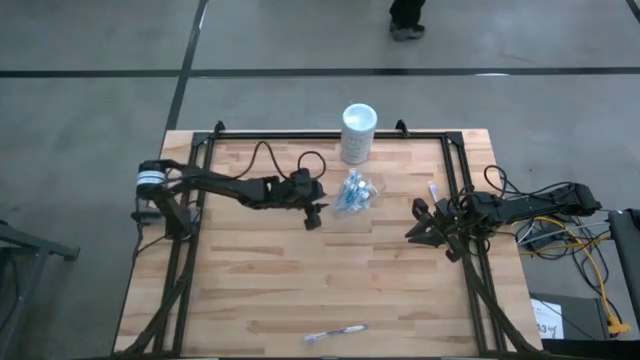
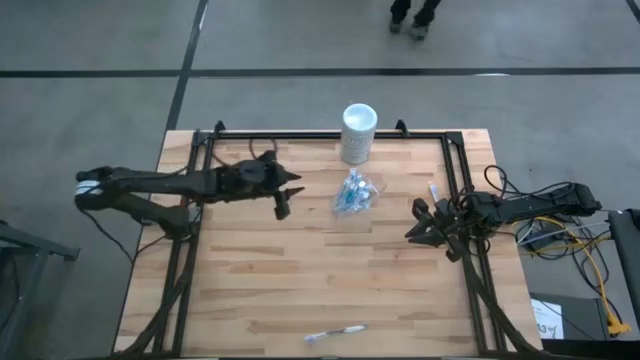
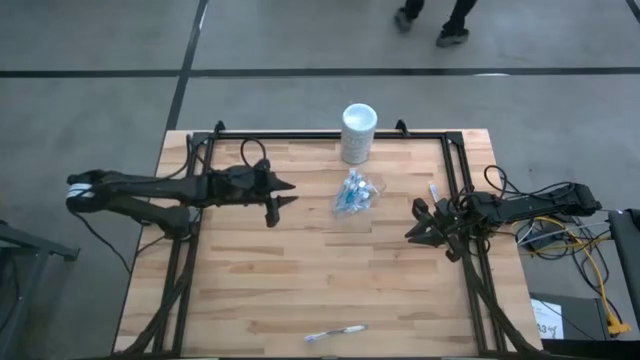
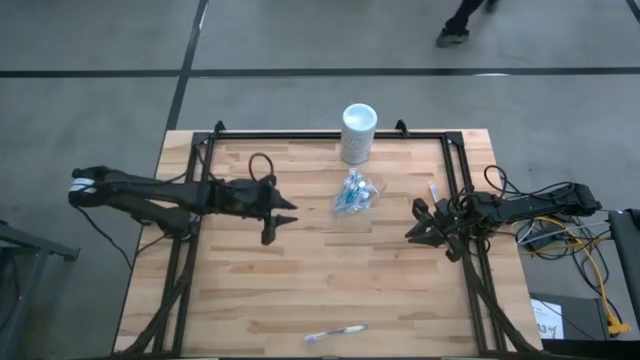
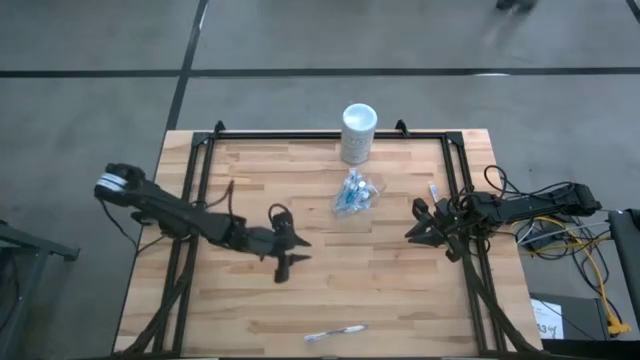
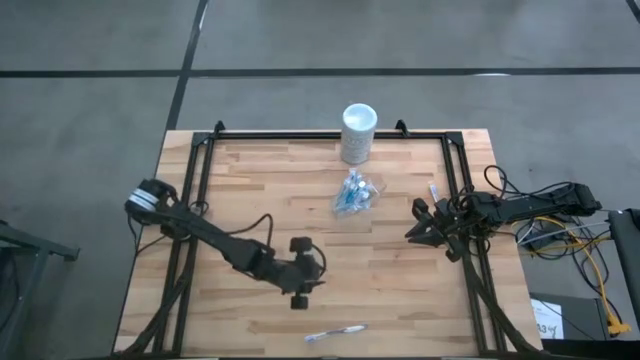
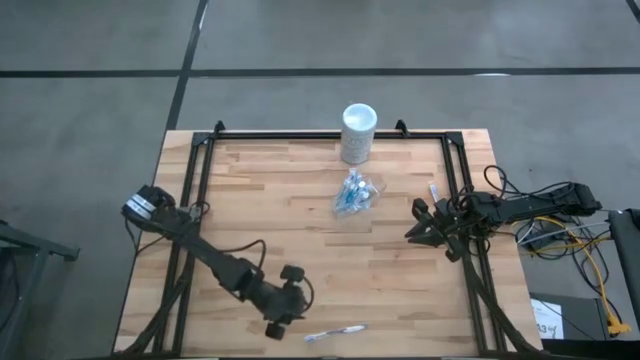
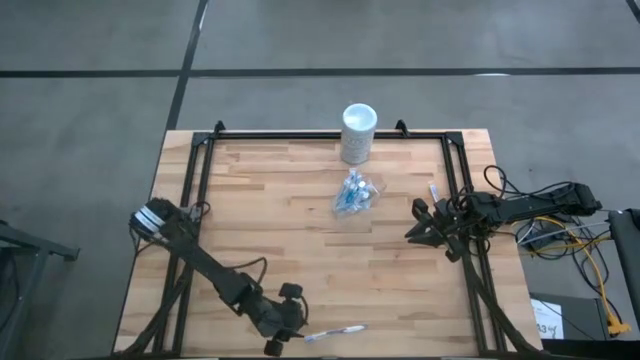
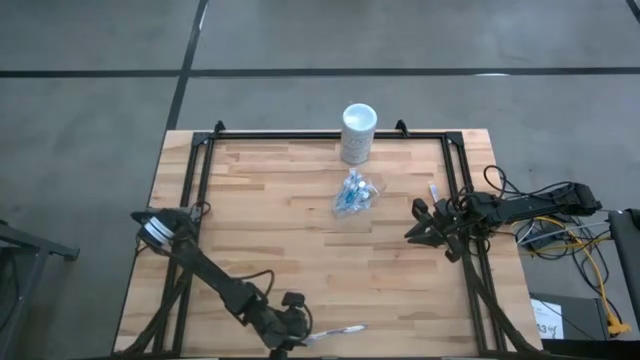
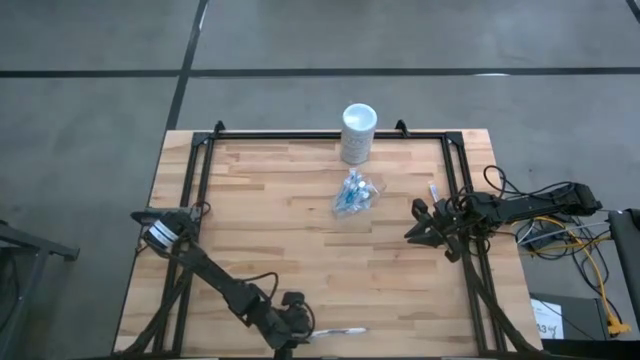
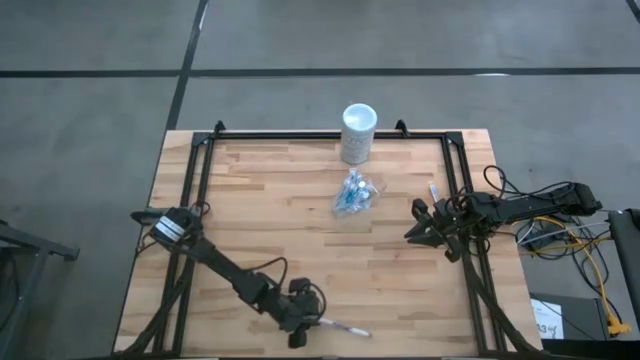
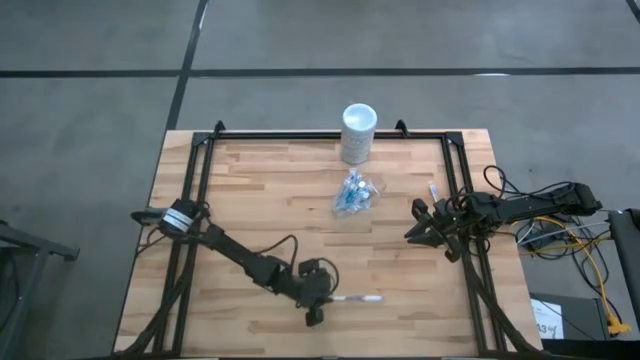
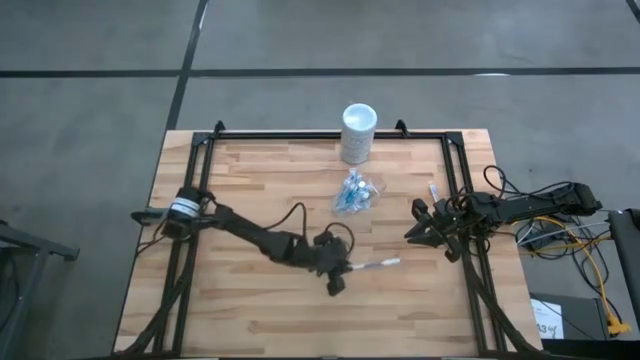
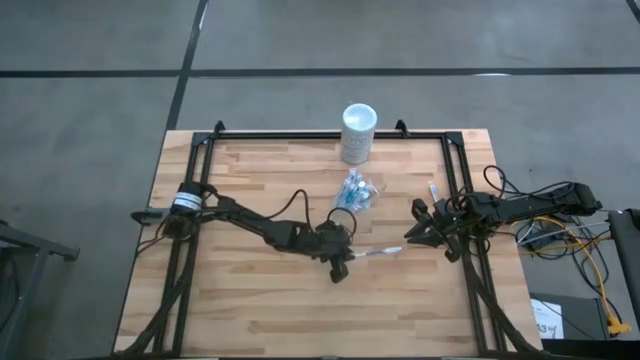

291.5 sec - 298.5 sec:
Task: Pick & Place toothbrushing station
Move the purple toothbrush to the center of the table

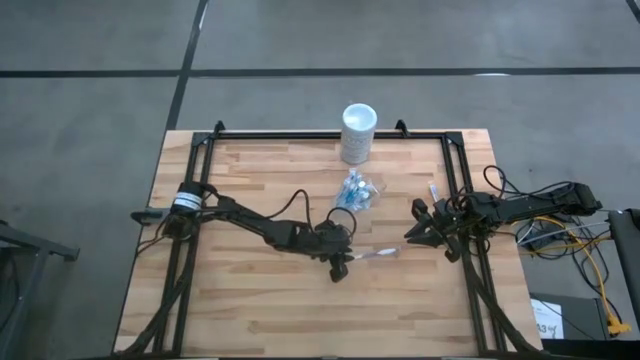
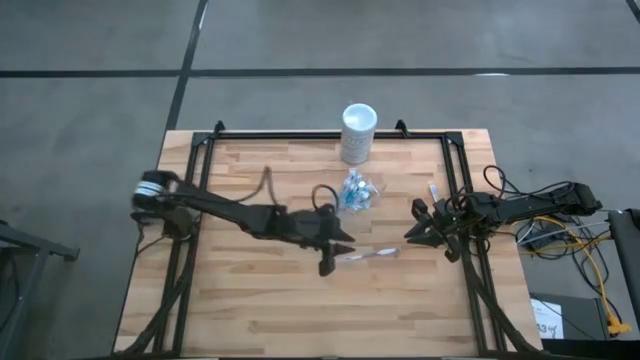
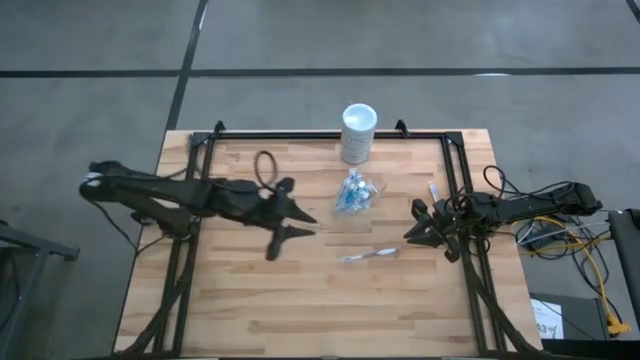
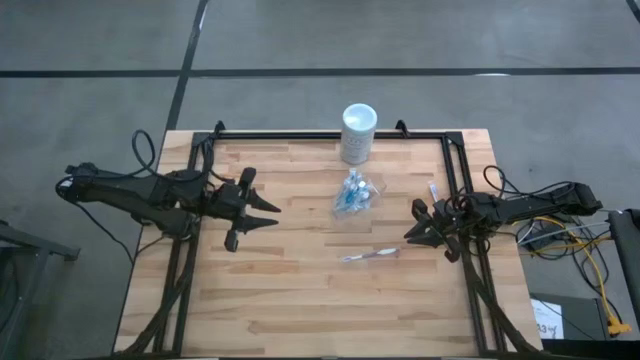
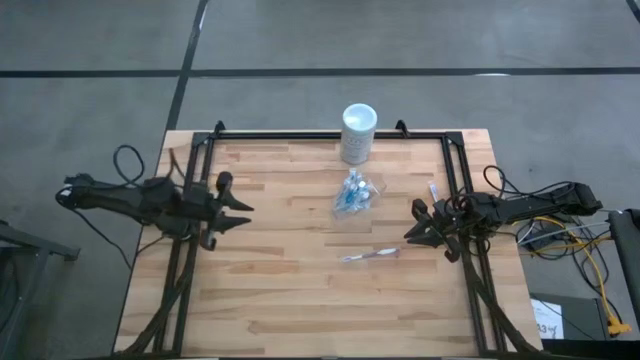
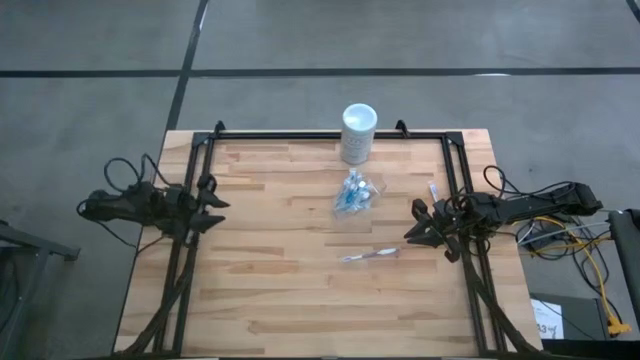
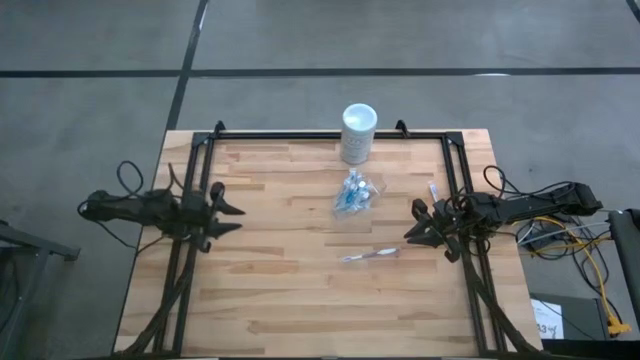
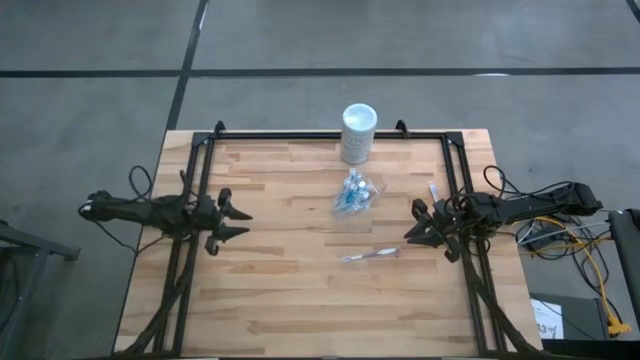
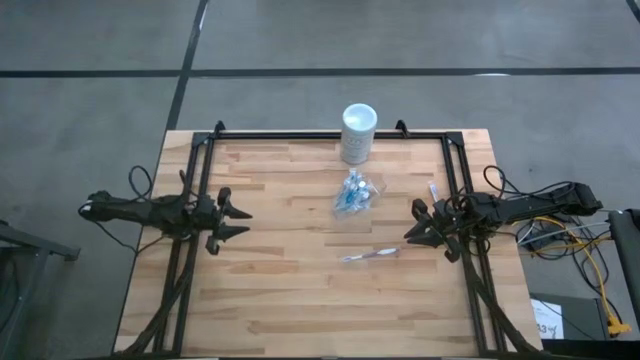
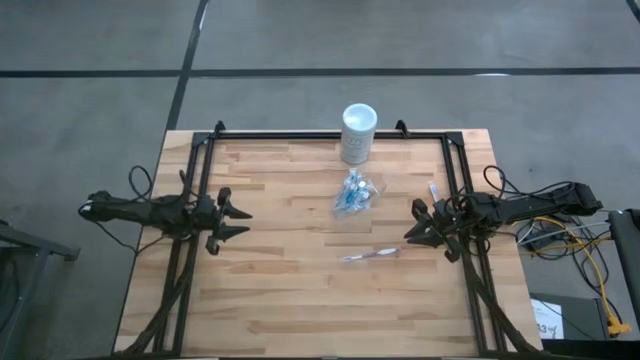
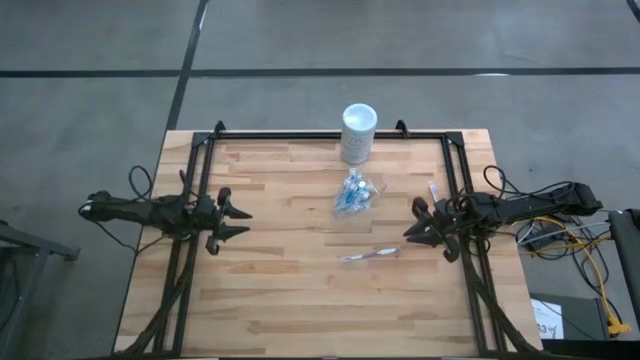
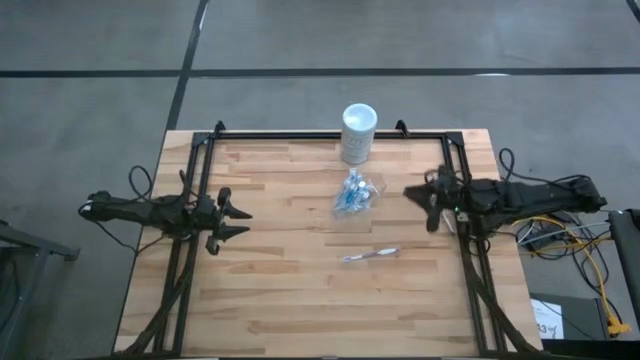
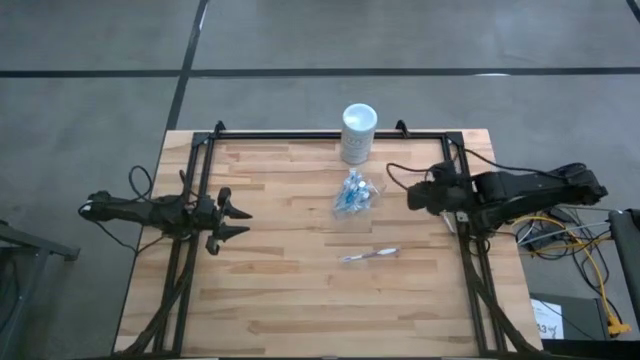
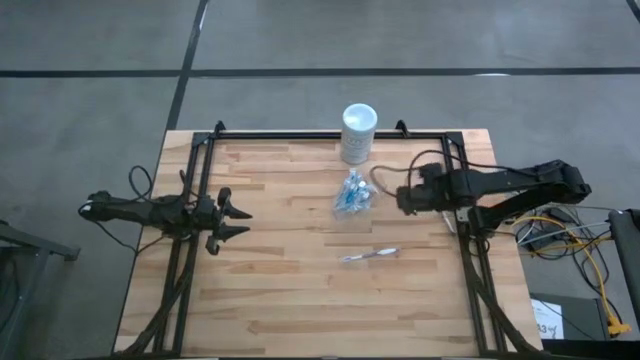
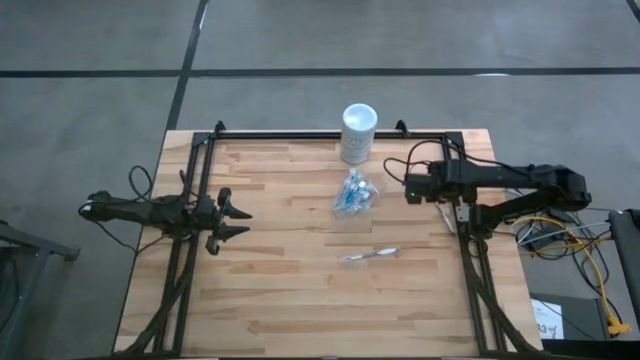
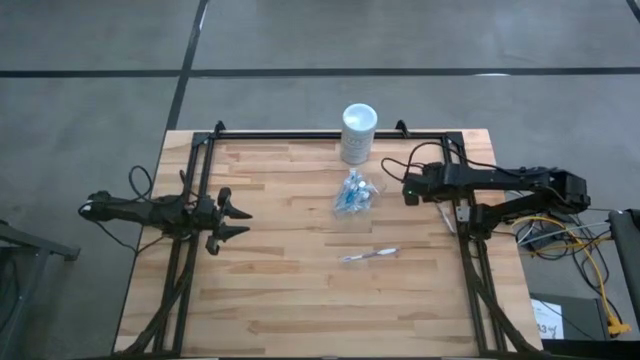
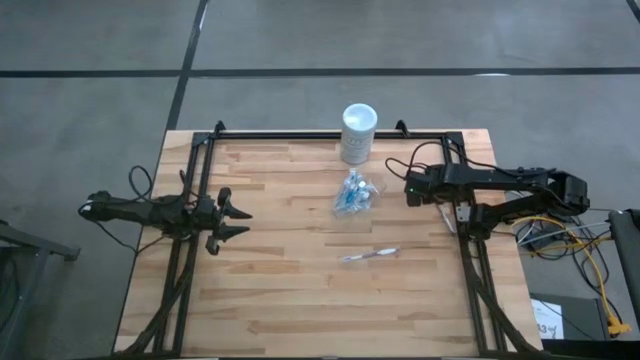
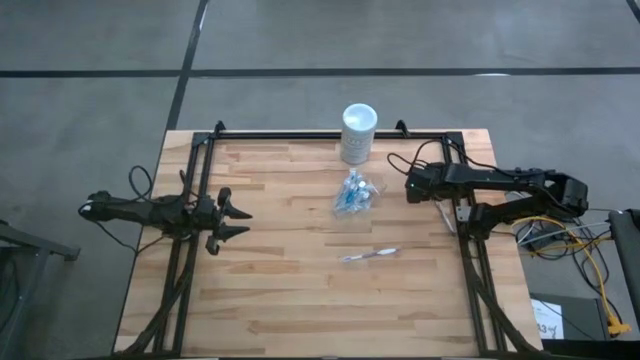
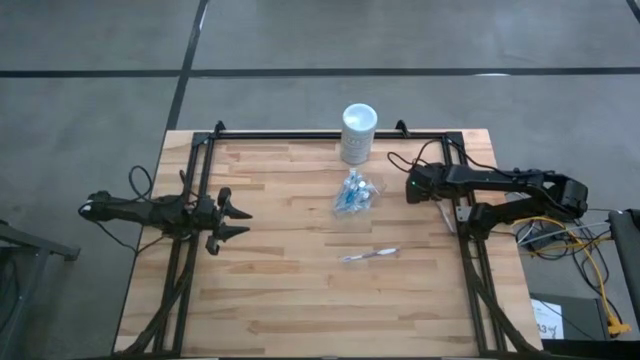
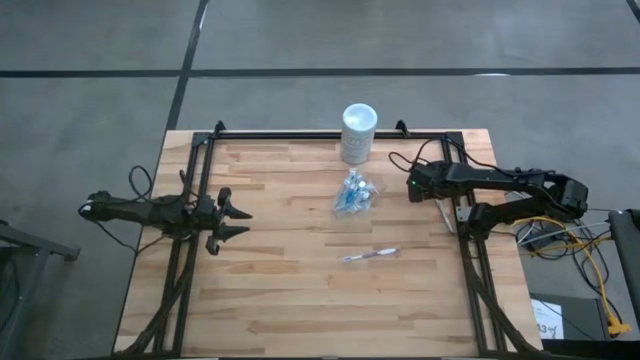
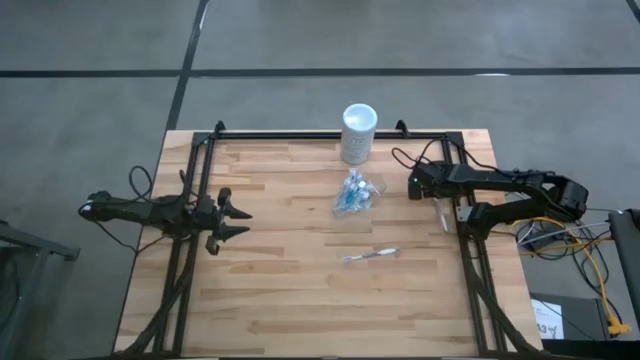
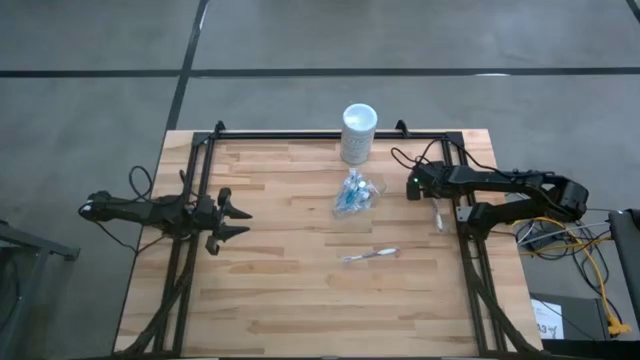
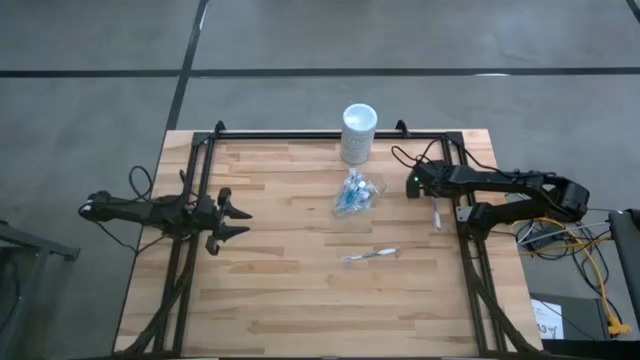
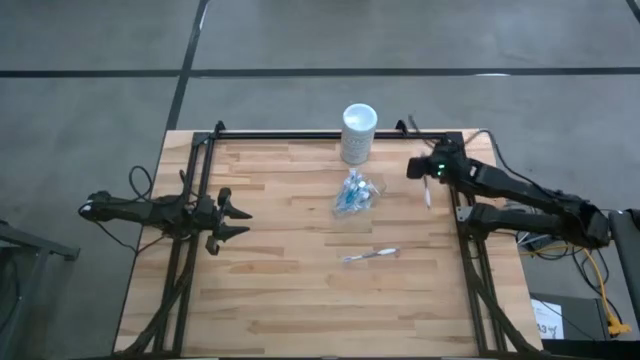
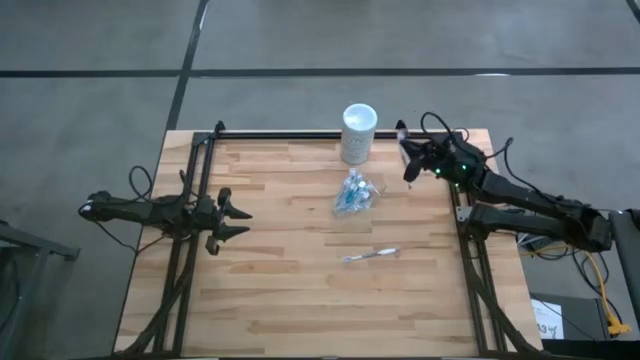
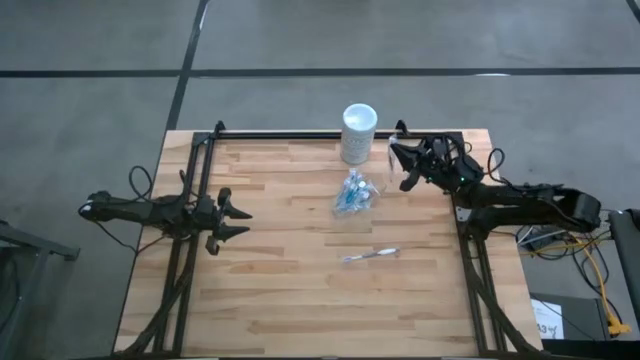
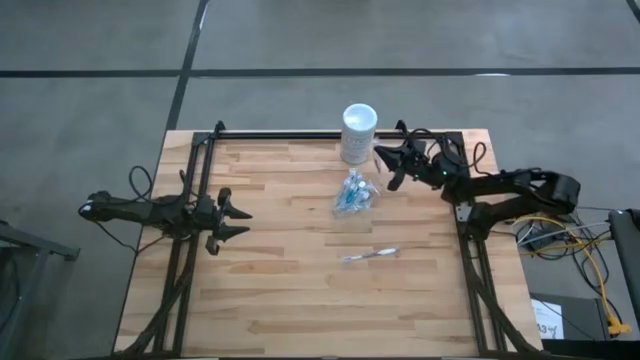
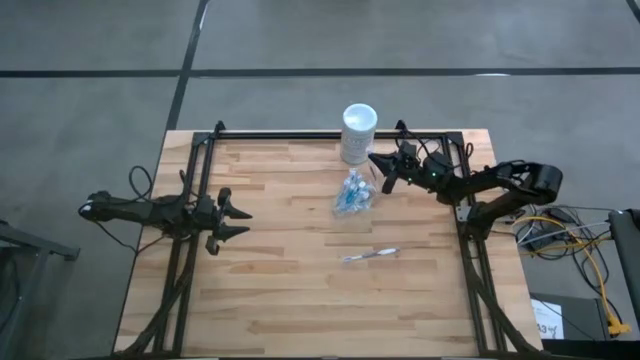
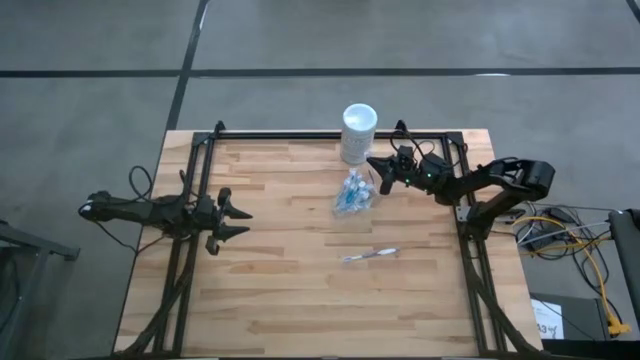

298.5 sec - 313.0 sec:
Put the purple toothbrush into the transparent organizer
